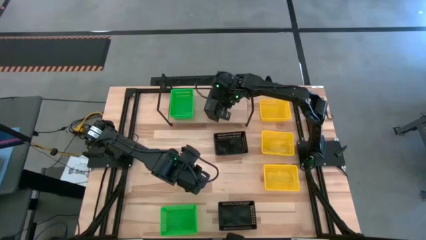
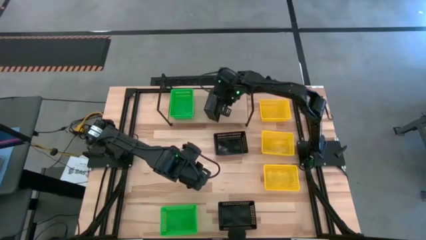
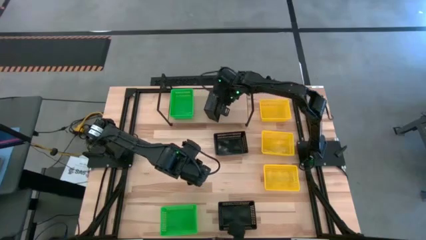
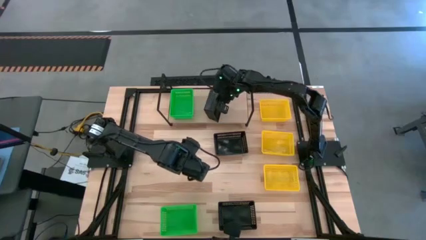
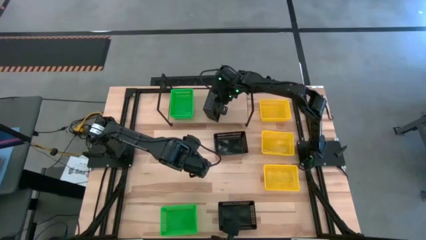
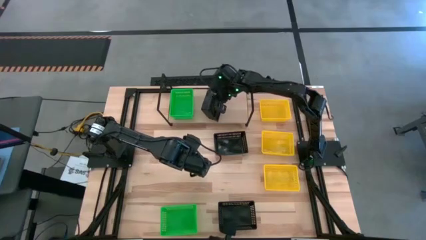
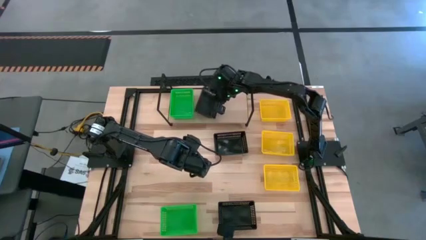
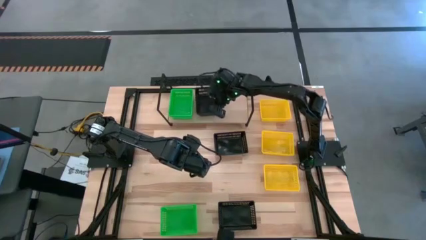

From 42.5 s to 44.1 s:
Task: Stack baskets on shelf by color
Put the middle black basket on the shelf

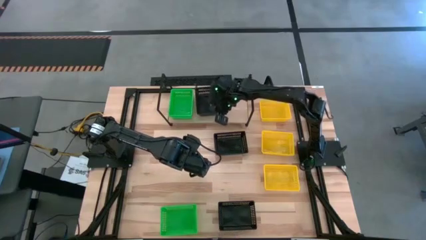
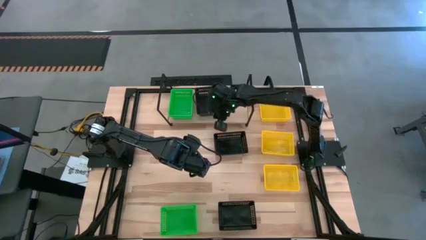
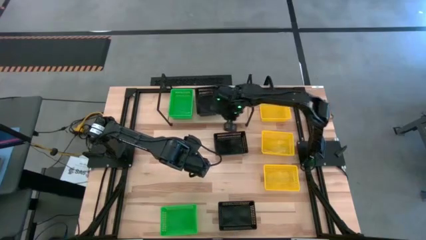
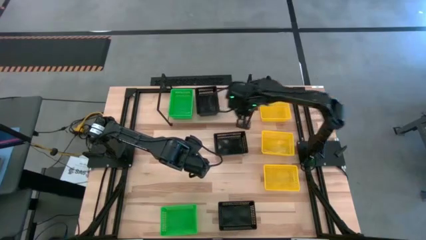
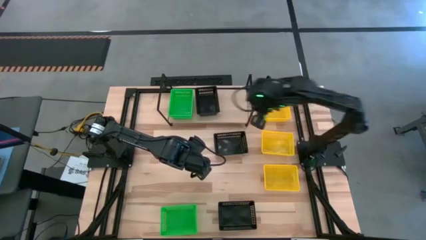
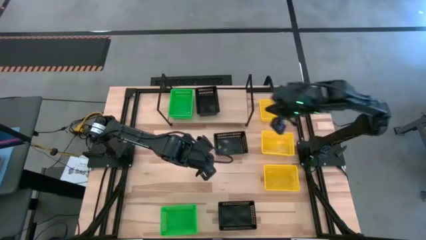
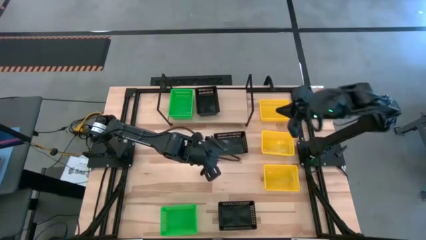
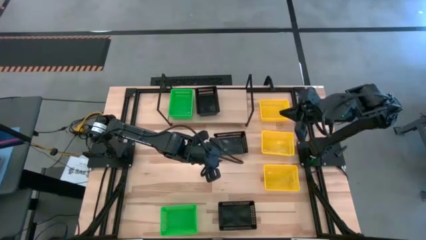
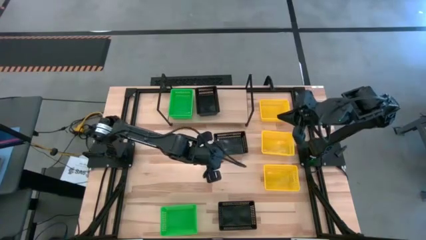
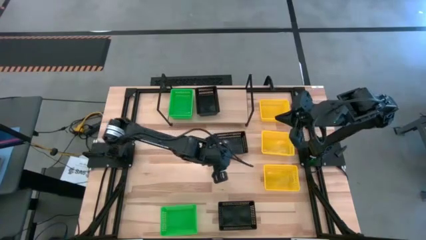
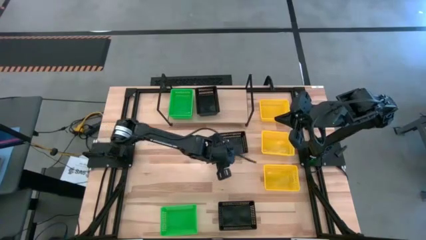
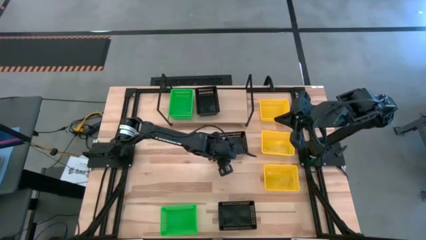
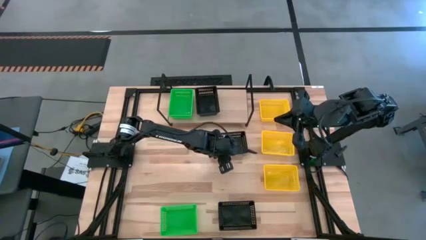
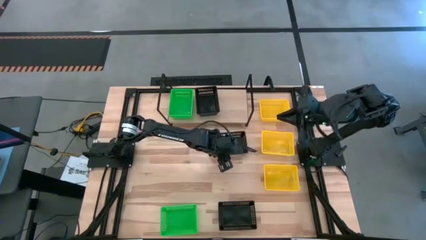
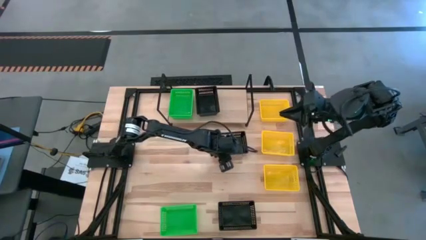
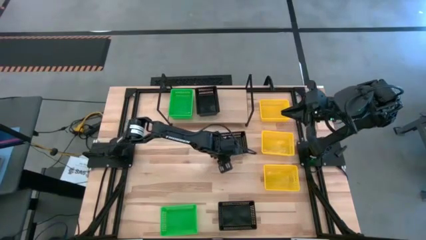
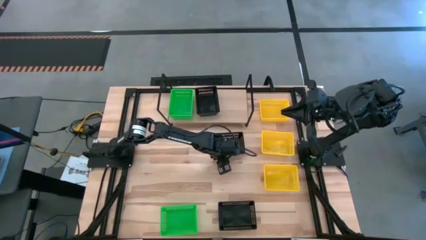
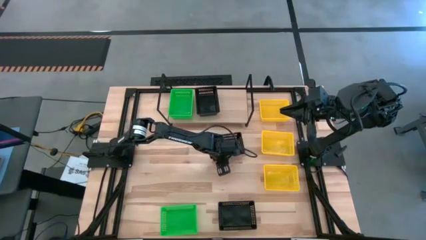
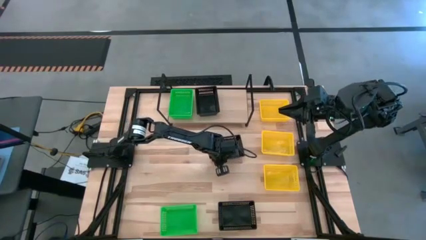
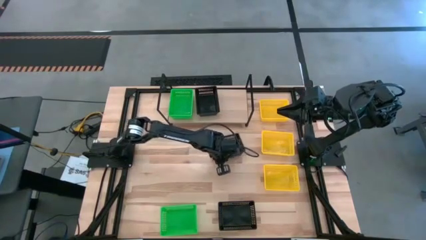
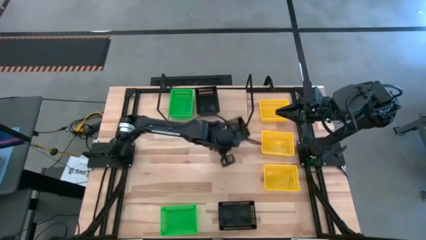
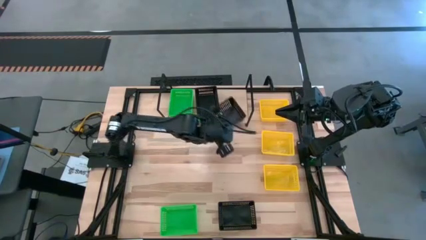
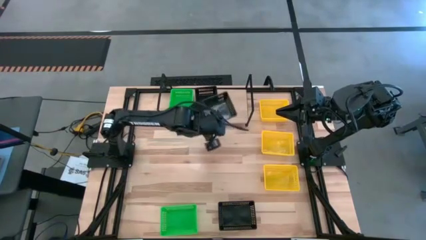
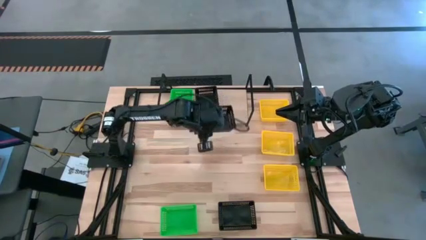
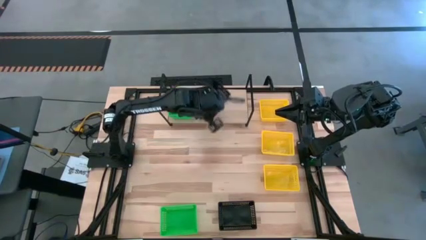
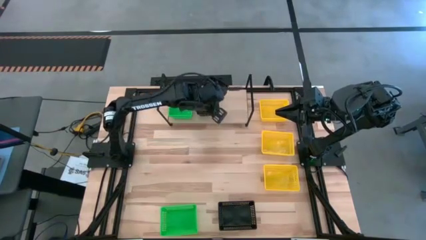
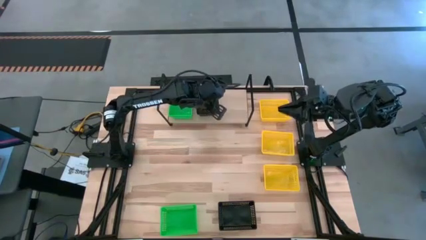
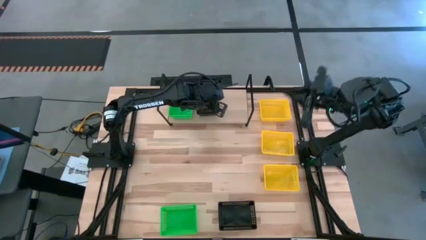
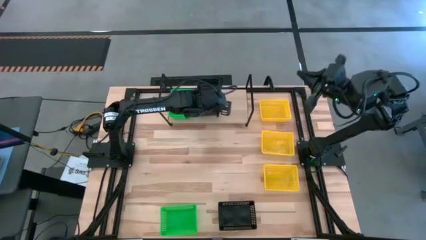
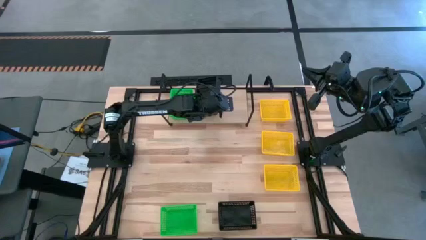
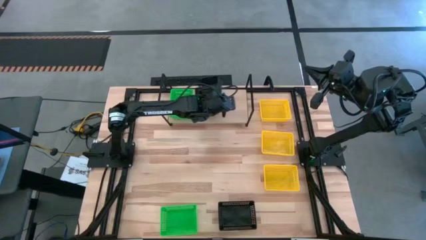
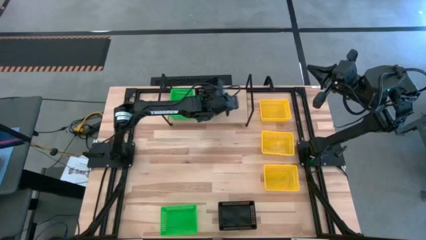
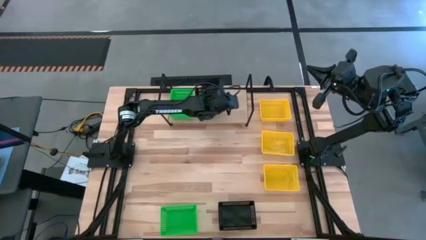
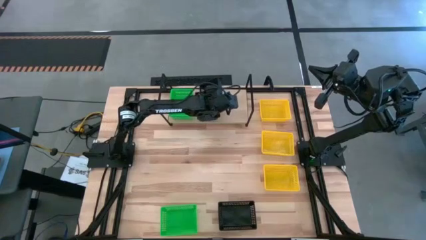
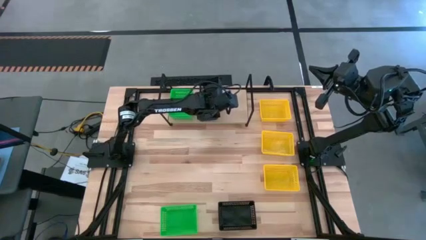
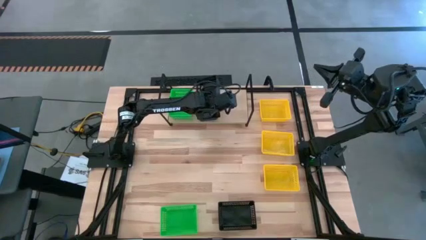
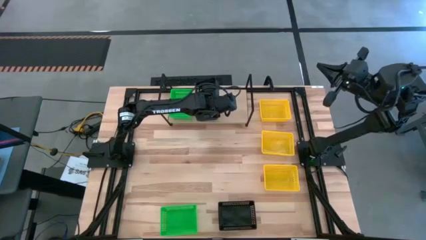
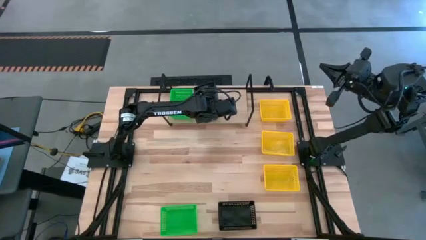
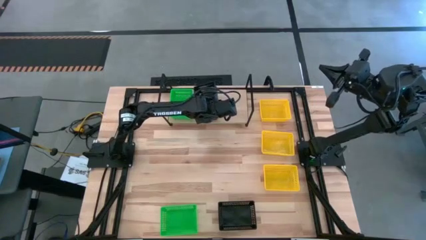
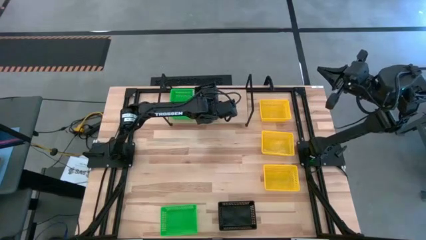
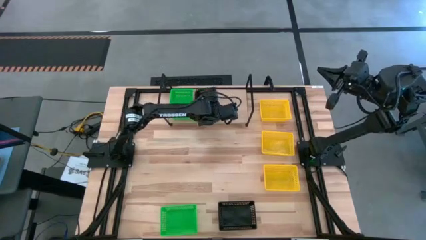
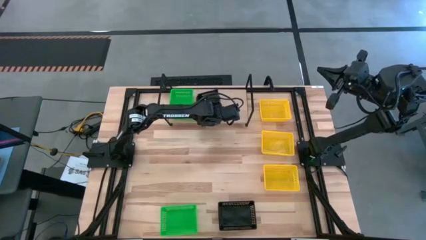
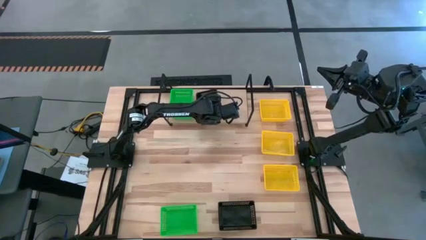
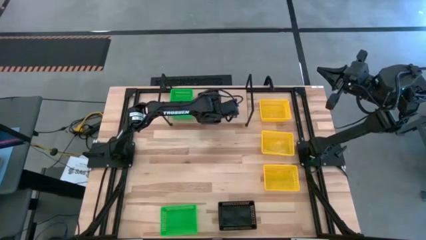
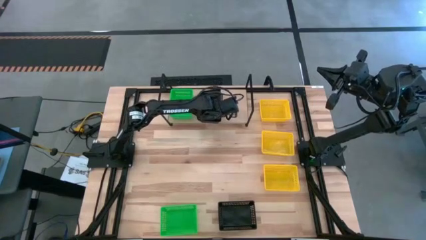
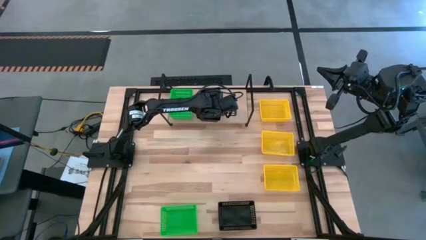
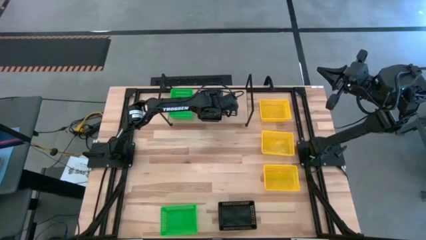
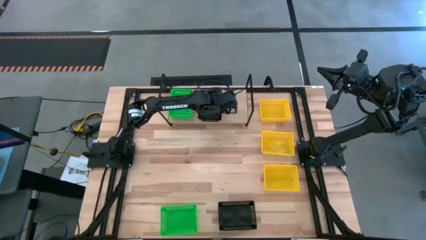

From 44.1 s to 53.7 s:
Stack the top black basket on top of the black basket on the shelf
